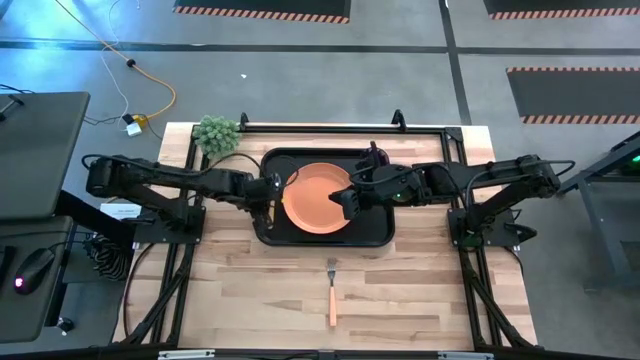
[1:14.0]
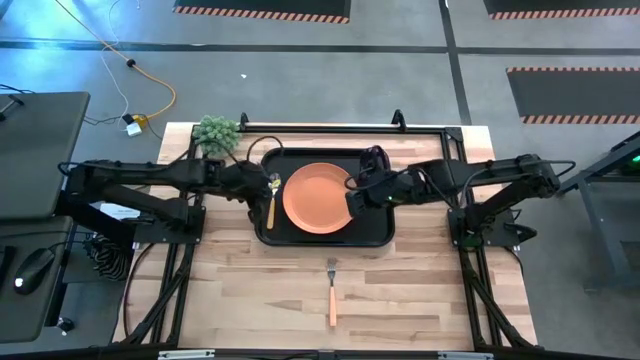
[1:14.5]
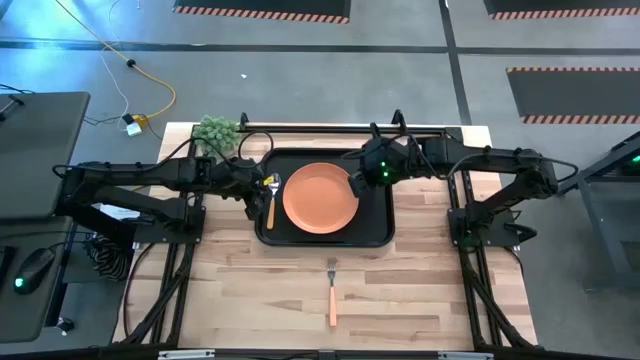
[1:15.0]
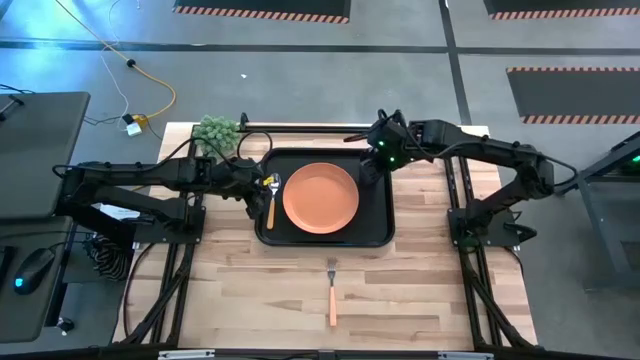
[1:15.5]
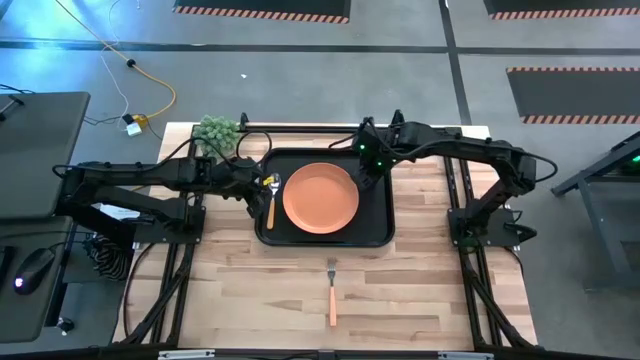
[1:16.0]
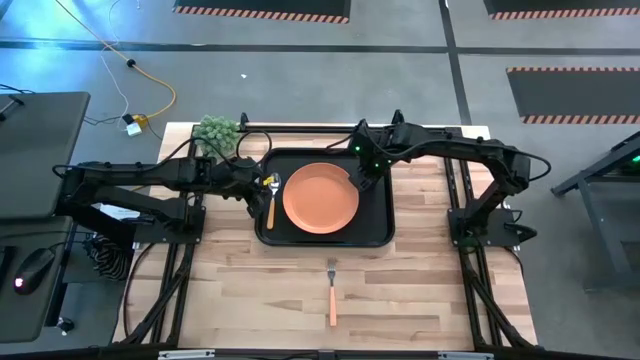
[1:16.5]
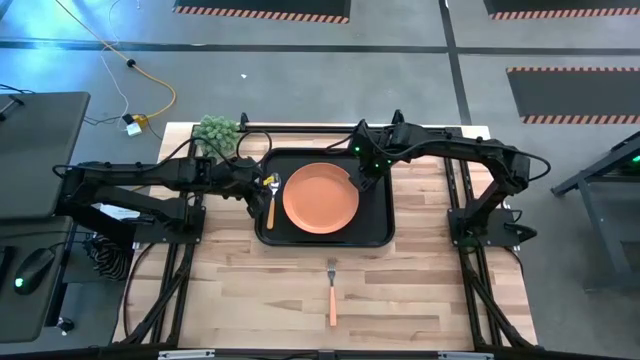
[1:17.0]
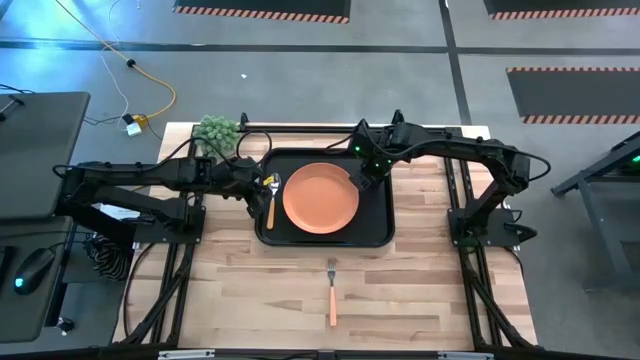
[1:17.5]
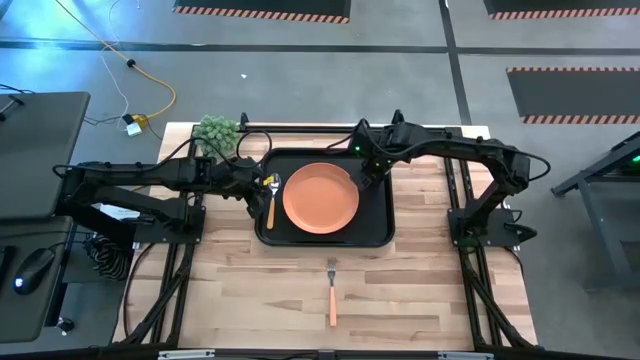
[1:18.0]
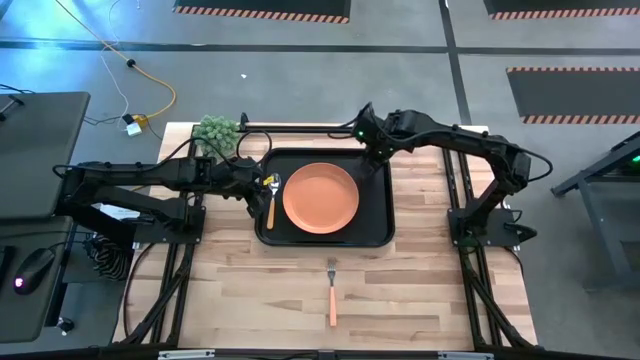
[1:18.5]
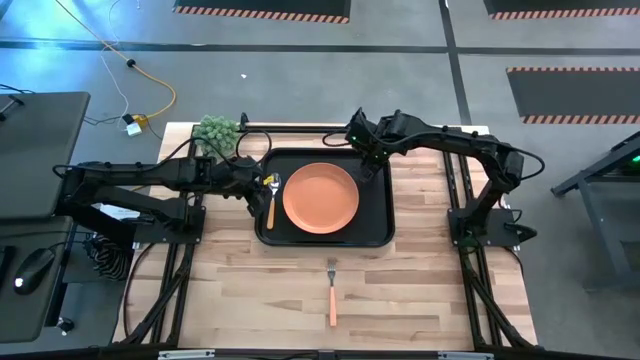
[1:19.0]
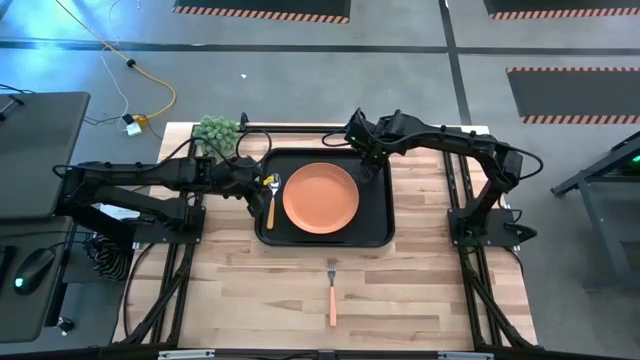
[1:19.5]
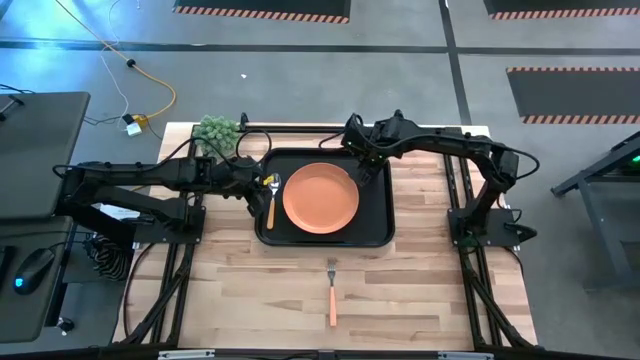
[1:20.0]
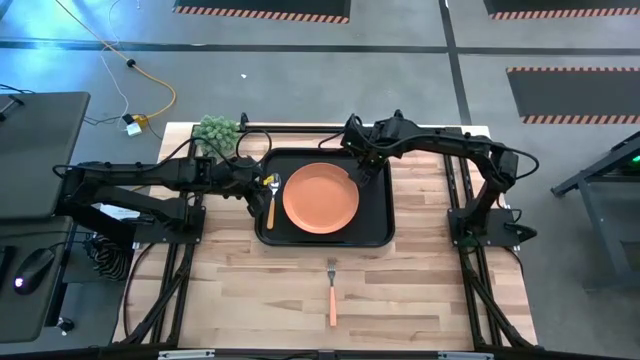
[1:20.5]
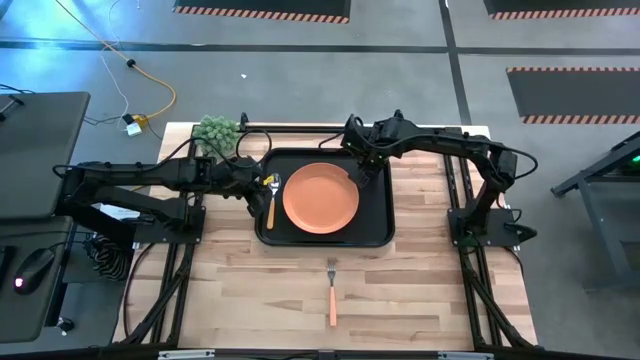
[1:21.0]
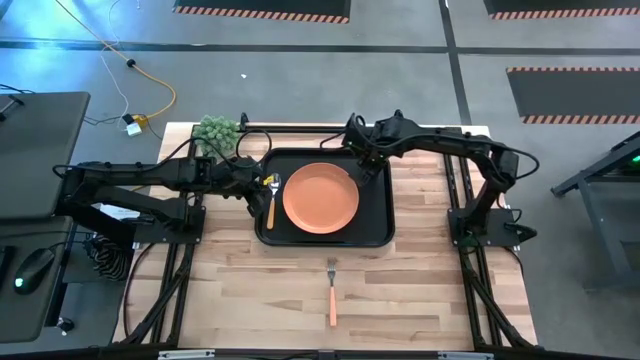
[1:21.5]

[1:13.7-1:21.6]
Task: Pick and place plate/cup/fork/spoon on tray
Adjust the violet glass

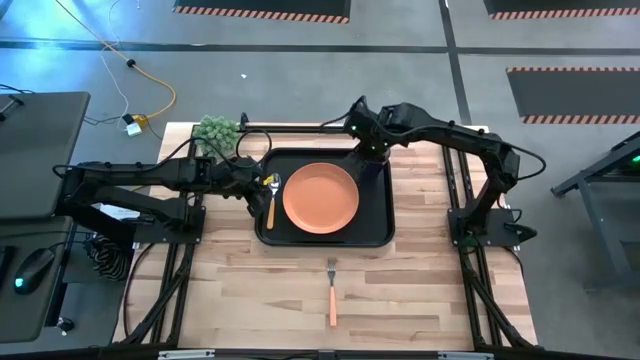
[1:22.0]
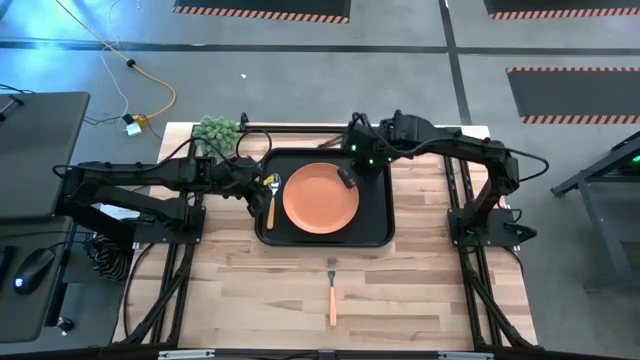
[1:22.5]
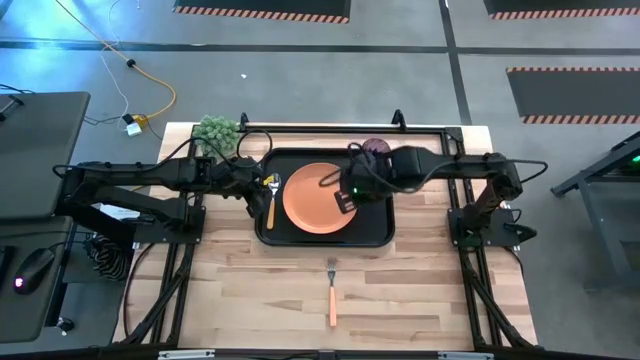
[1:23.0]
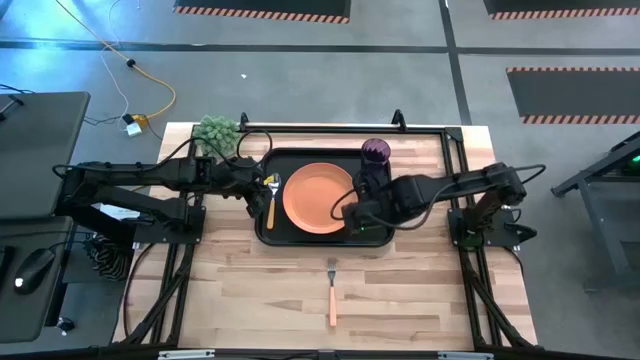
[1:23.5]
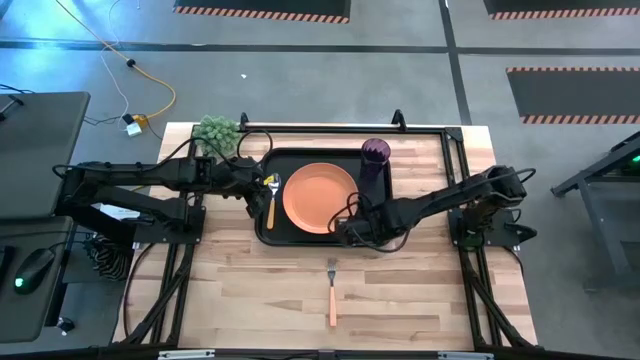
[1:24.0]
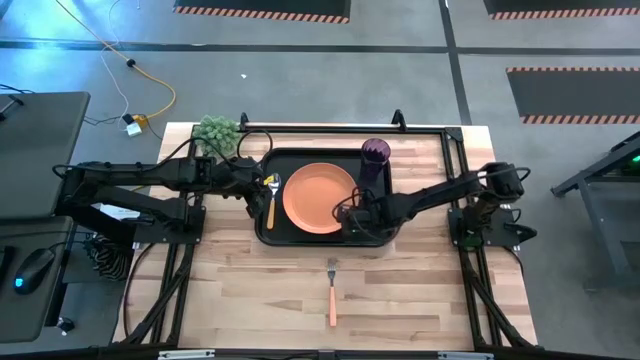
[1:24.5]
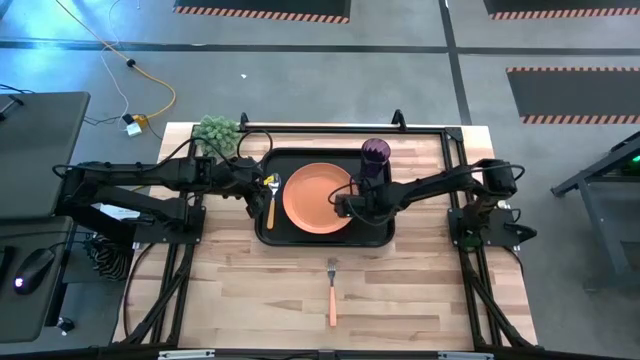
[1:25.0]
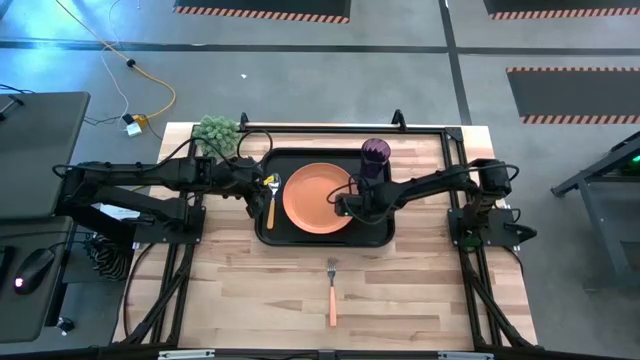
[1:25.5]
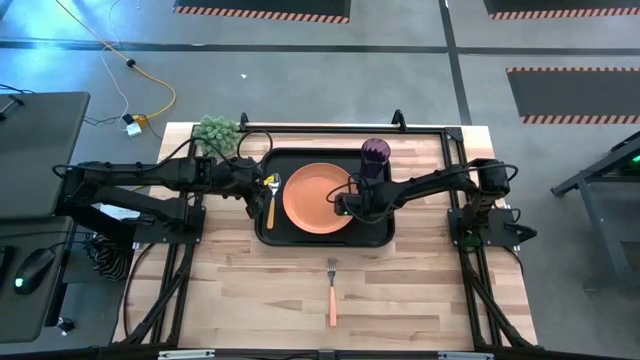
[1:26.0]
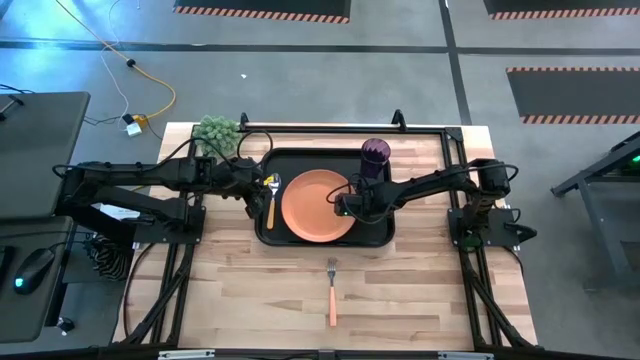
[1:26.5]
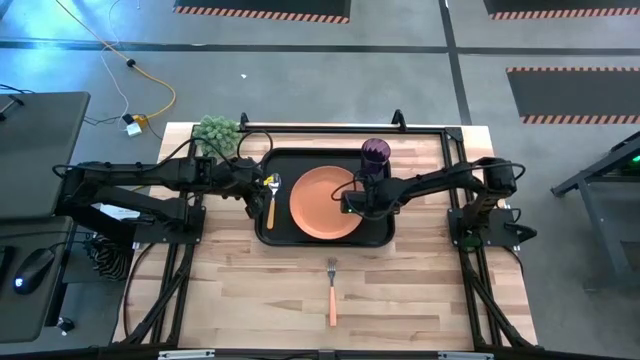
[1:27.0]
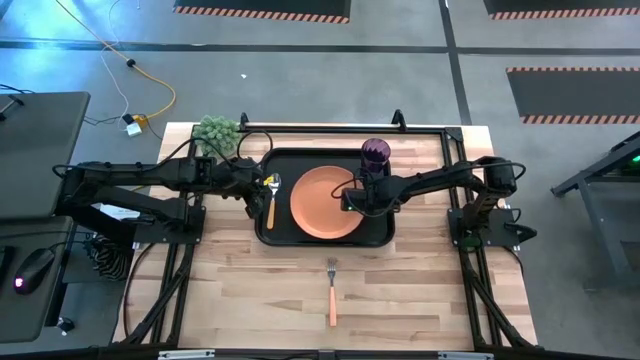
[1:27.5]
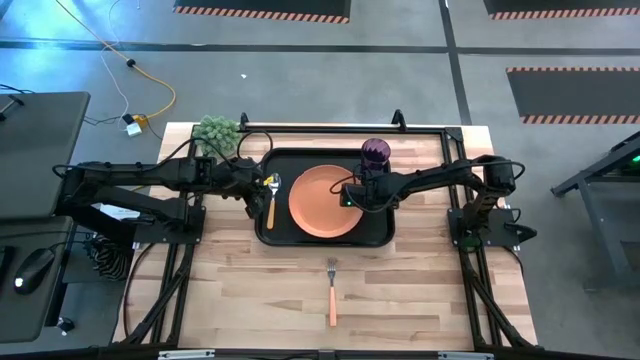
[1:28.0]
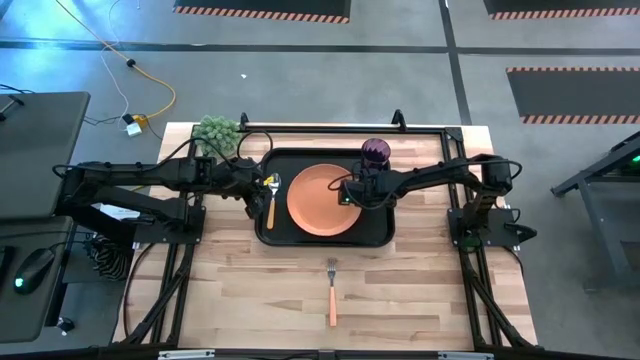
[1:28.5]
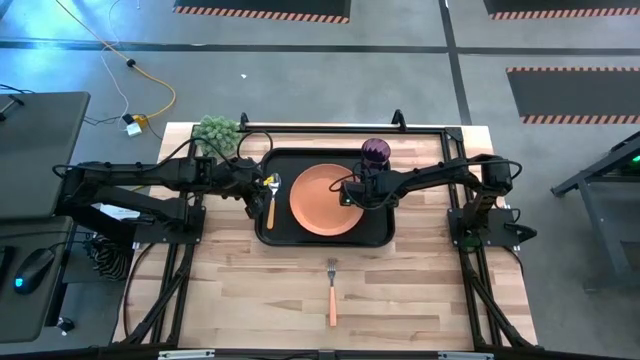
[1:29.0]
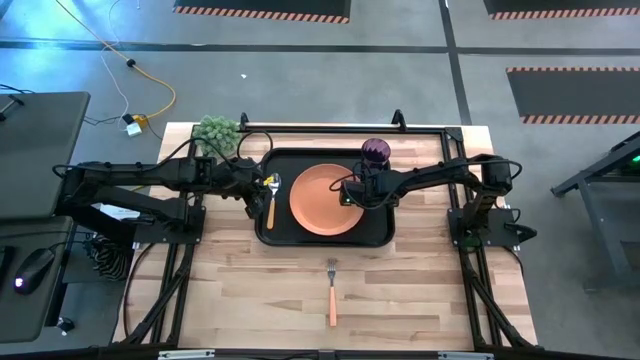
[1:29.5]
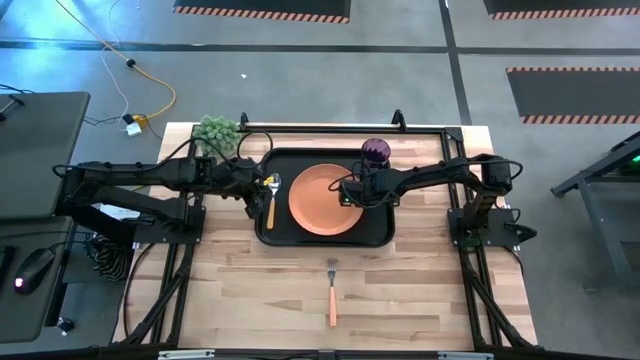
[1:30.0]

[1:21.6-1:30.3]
Adjust the orange plate

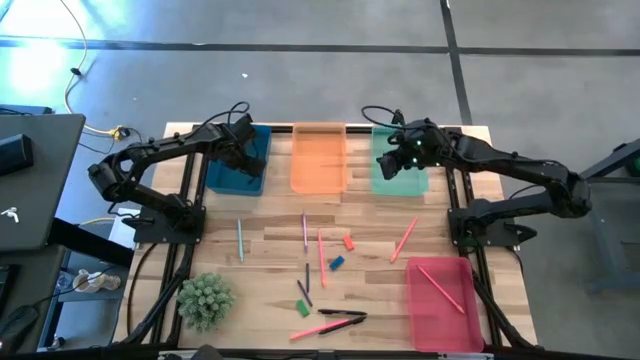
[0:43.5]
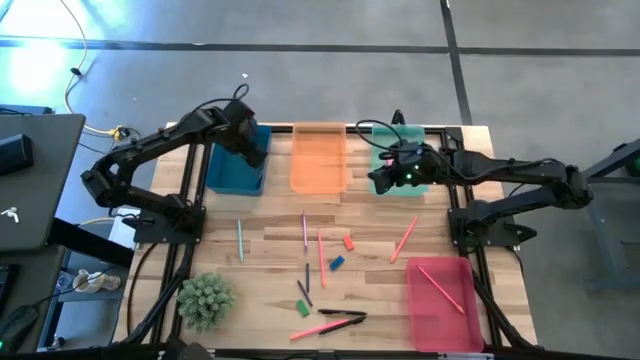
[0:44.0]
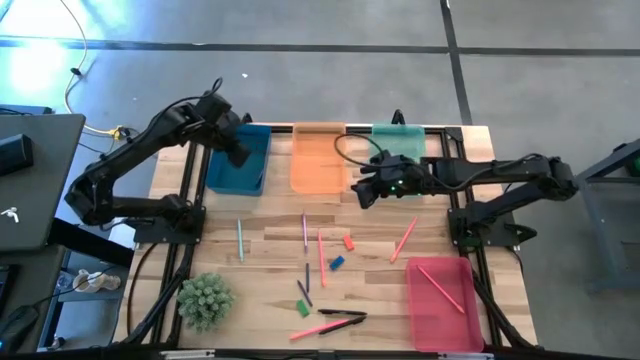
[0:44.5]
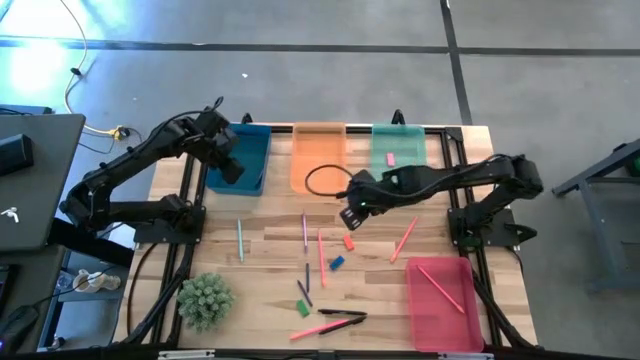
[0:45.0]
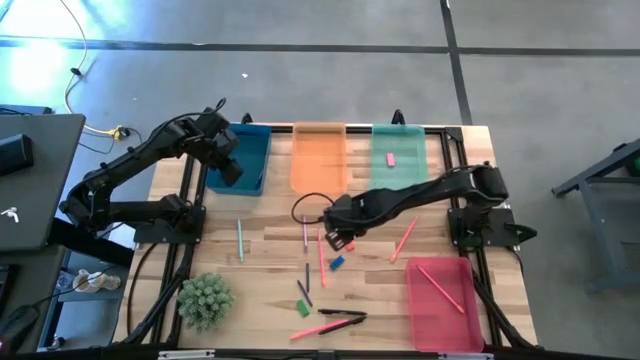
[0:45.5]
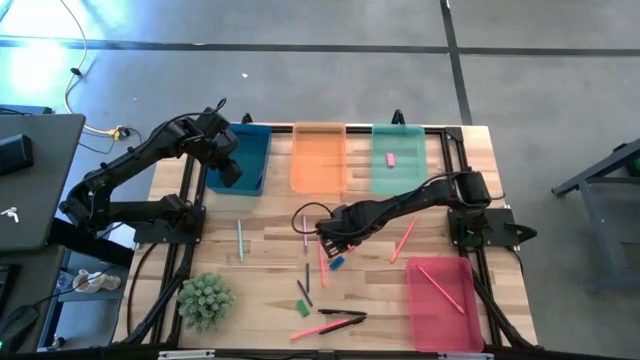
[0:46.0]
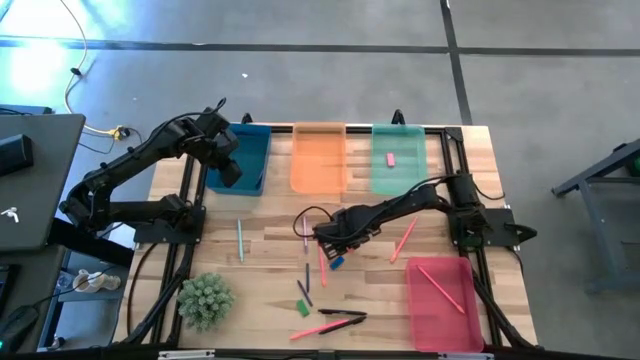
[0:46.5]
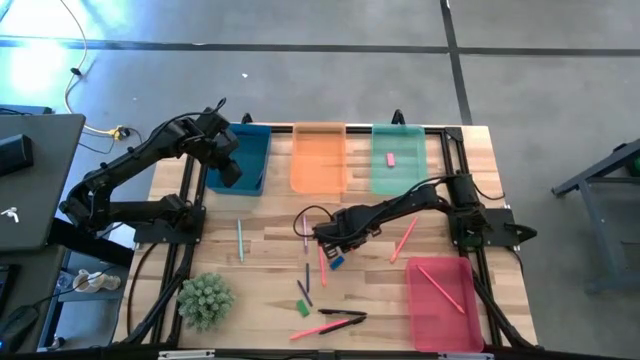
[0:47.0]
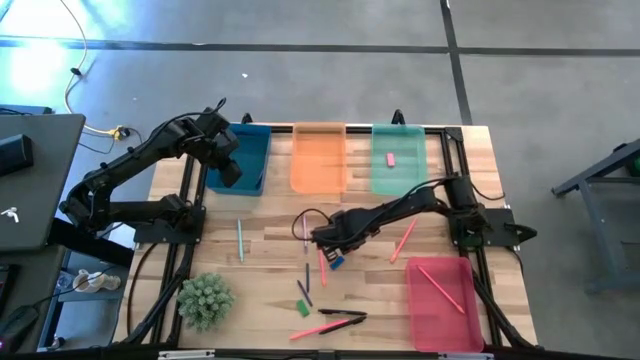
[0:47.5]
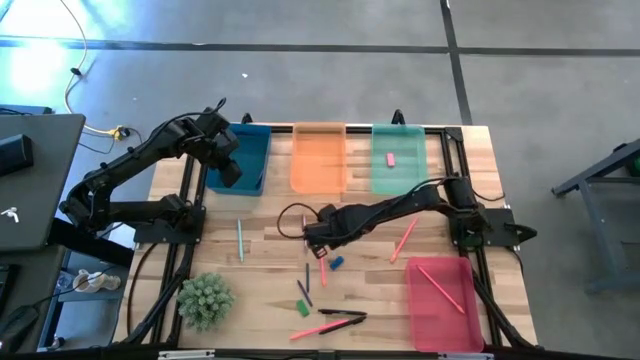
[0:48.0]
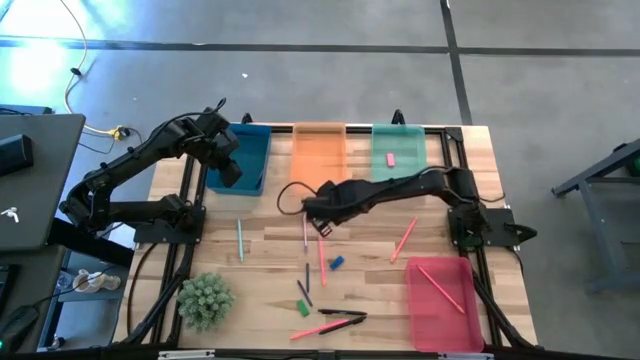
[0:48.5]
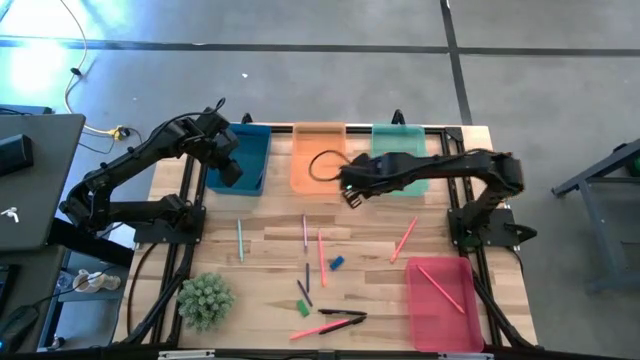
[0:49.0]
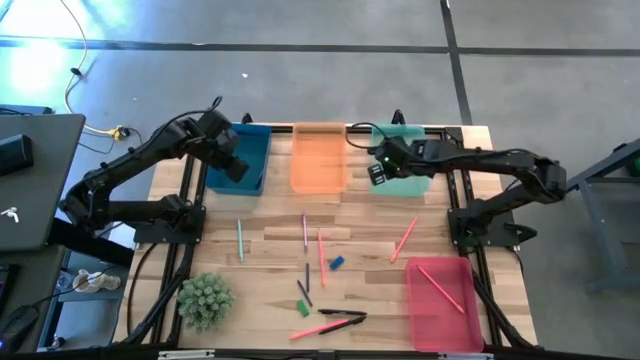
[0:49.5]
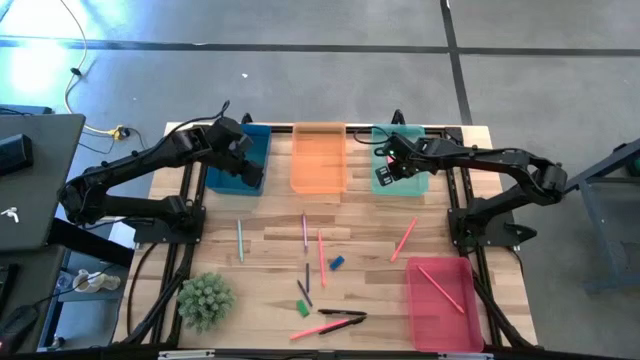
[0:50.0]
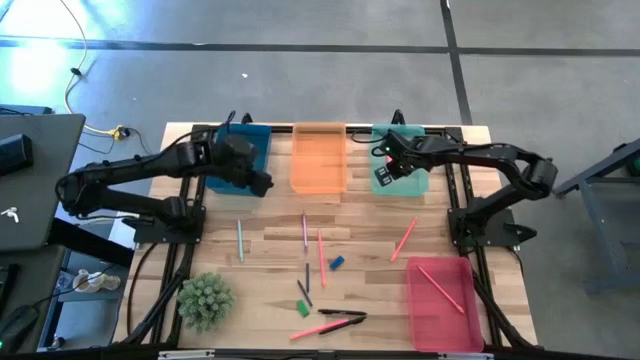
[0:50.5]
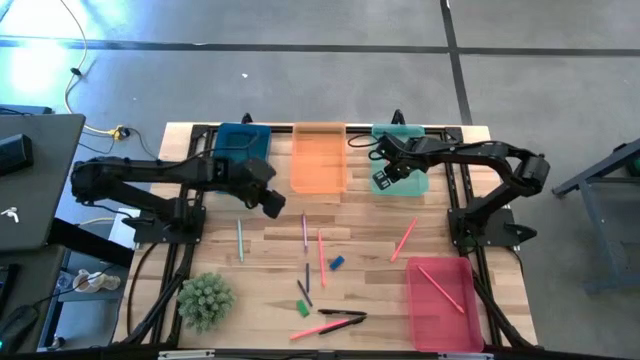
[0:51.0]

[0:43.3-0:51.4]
Task: Sort crayons/erasers/pens/pencils in bins
Put the orange eraser into the green bin
